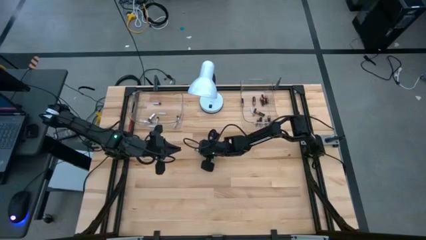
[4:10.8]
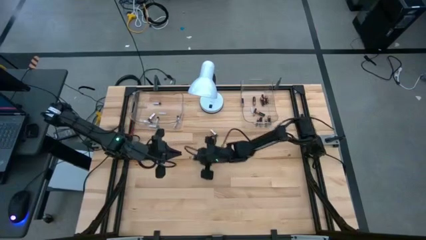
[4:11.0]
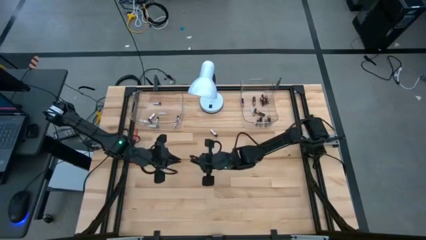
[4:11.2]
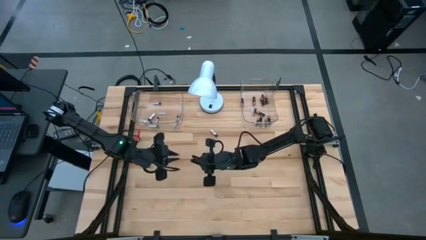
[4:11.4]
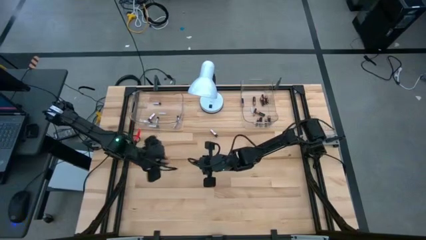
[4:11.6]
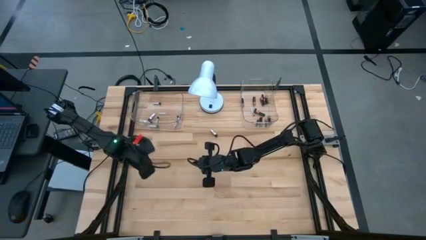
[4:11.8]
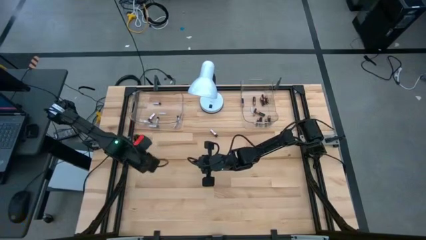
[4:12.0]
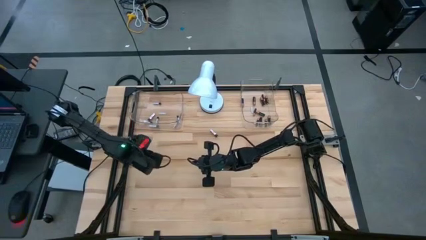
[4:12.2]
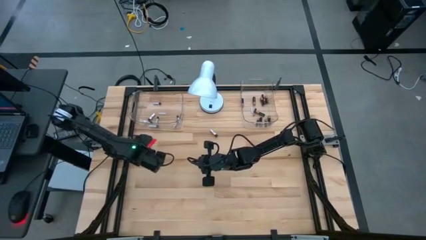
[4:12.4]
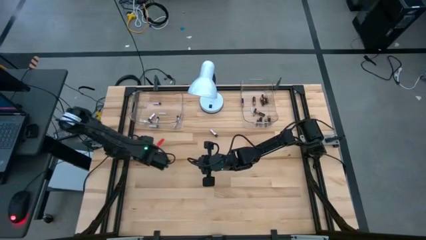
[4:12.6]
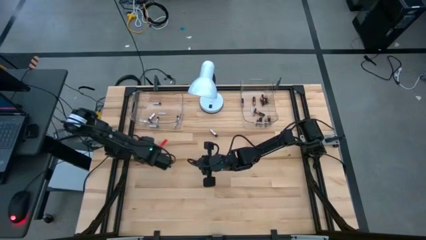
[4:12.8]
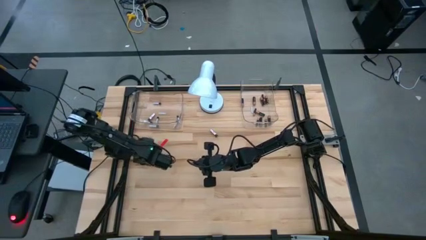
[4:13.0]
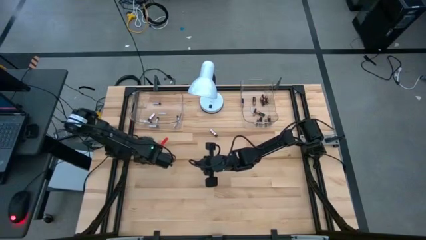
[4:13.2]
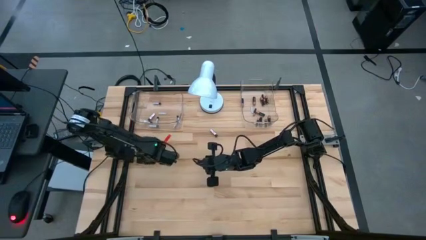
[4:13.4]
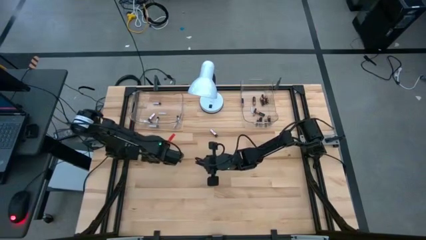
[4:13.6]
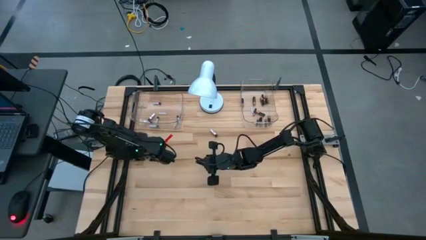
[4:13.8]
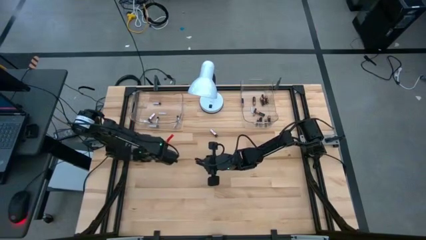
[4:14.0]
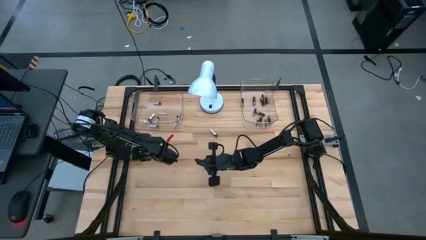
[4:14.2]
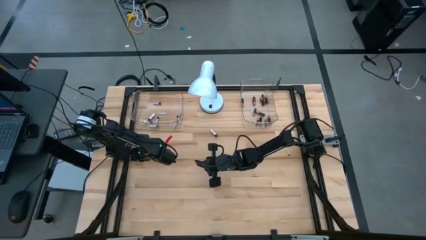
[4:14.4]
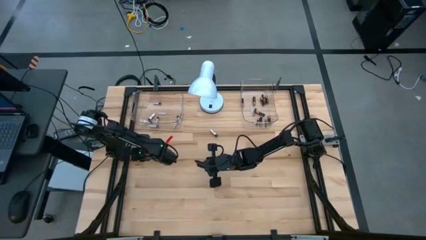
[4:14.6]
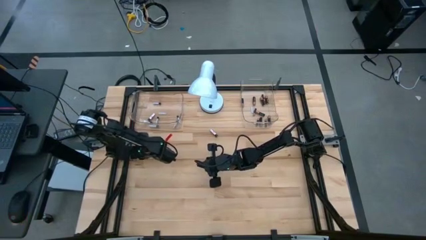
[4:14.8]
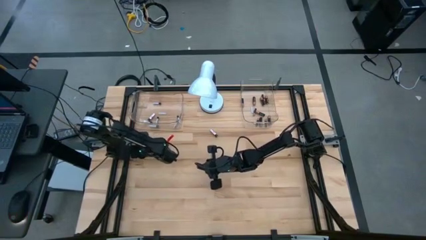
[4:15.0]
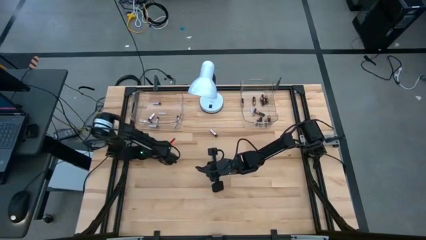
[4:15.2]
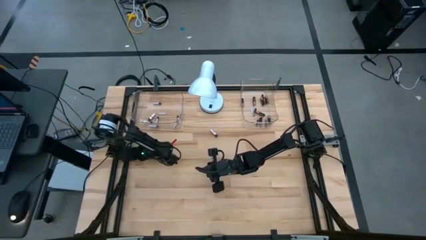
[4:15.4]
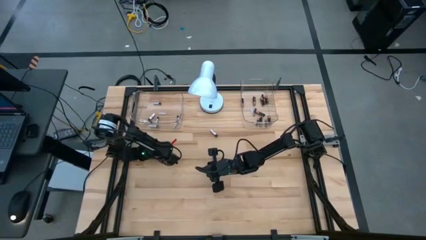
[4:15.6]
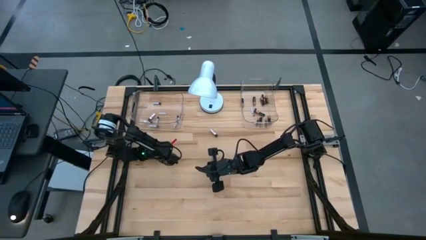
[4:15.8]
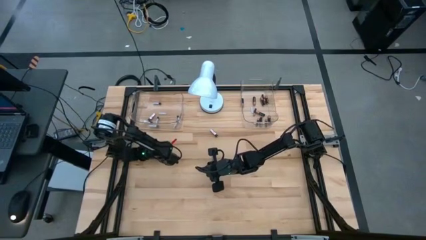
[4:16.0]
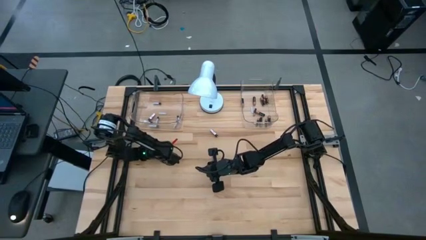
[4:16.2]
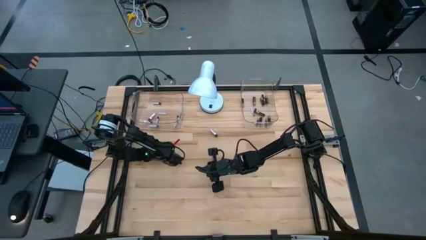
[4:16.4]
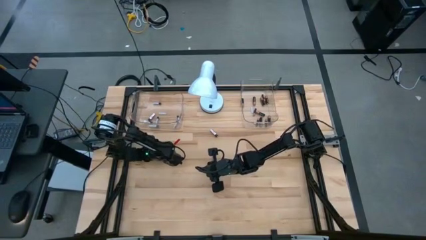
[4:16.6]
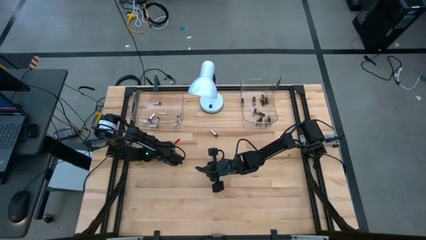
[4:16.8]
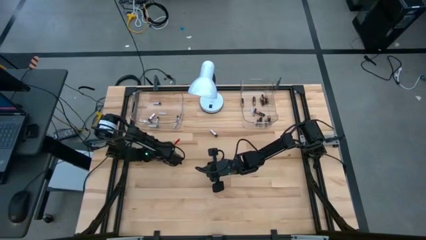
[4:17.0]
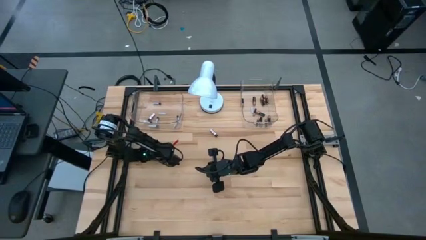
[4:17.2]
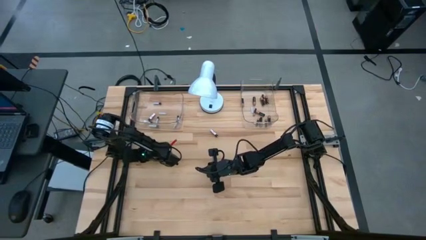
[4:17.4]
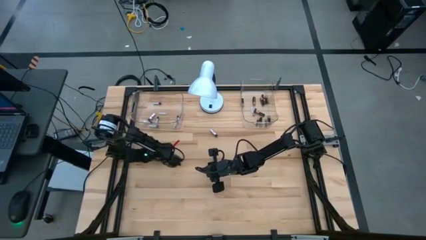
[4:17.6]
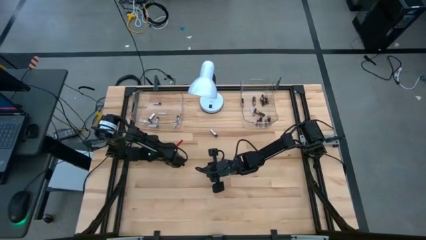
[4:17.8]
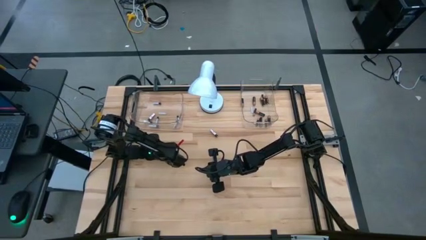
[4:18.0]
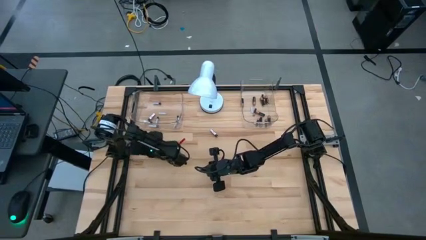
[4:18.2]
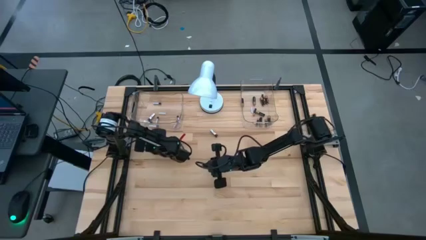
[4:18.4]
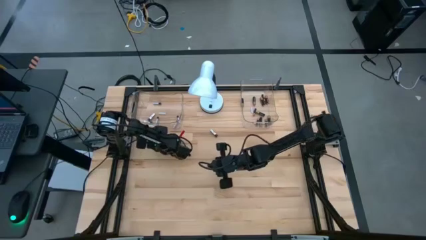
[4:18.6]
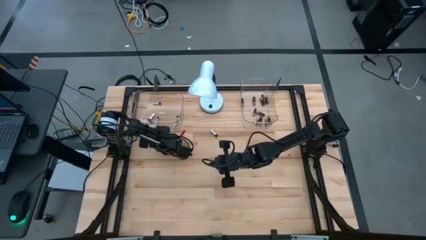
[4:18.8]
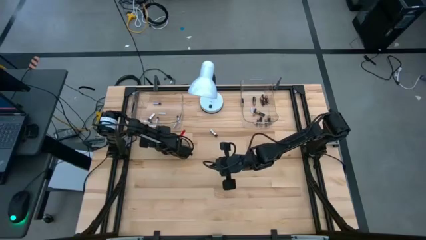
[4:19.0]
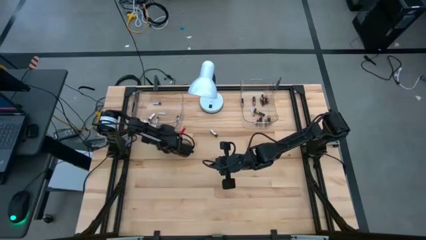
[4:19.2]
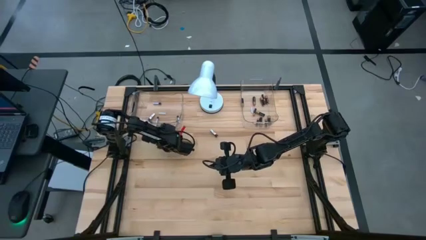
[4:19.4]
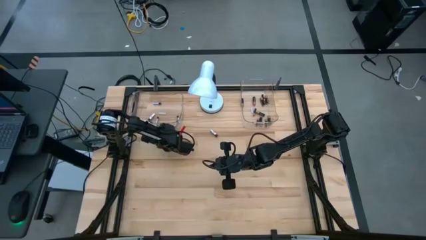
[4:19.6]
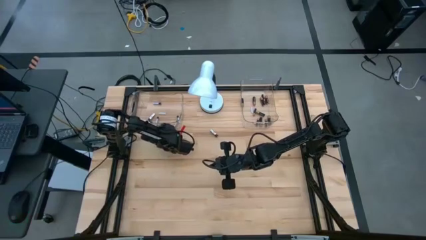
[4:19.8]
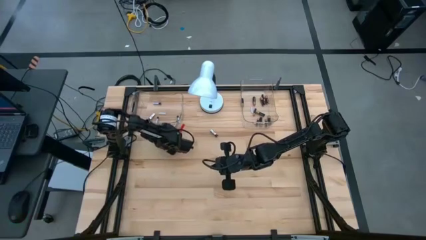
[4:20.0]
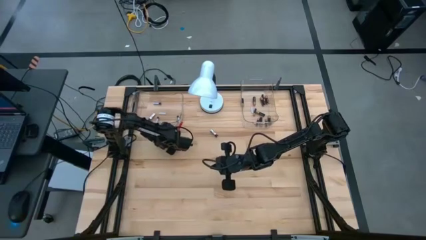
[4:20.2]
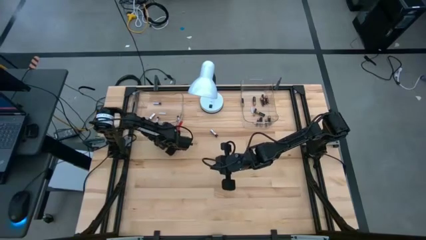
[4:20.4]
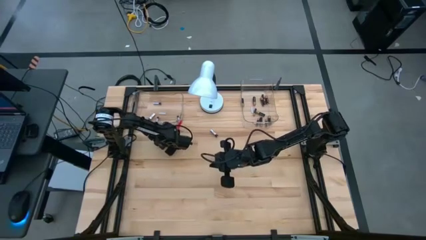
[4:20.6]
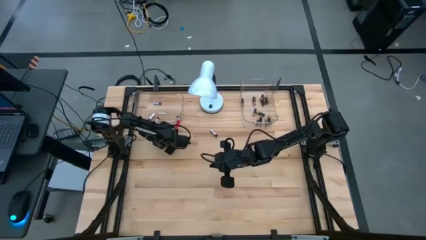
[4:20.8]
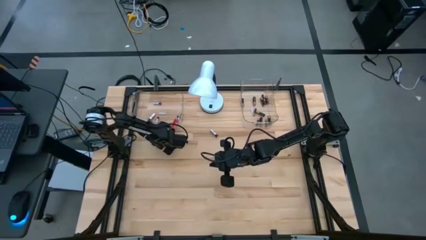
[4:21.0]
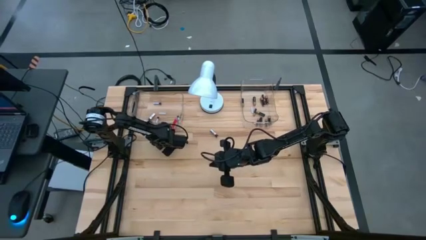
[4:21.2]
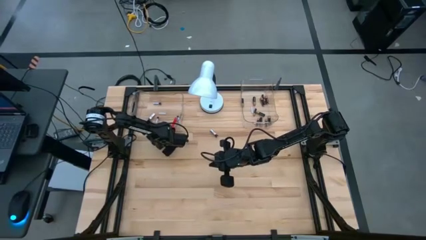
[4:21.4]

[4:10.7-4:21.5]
Task: Sort batteries
Put the silver battery in the transparent bin

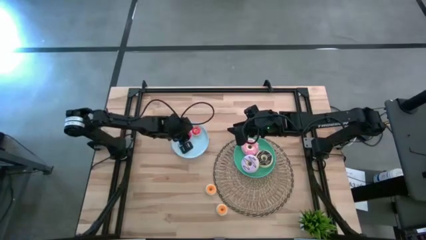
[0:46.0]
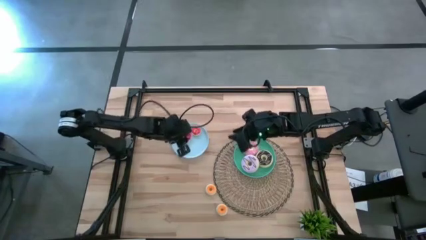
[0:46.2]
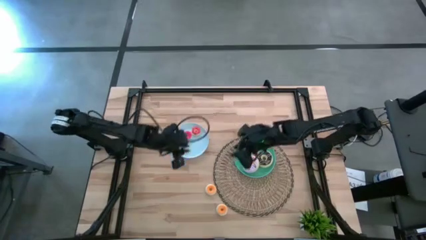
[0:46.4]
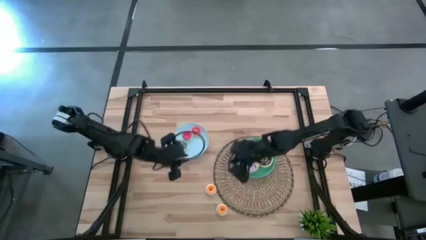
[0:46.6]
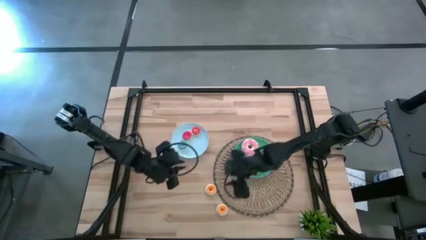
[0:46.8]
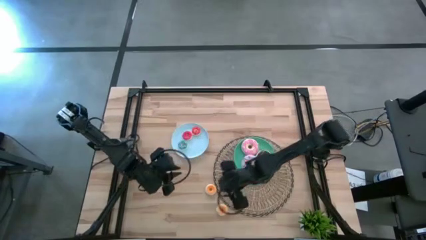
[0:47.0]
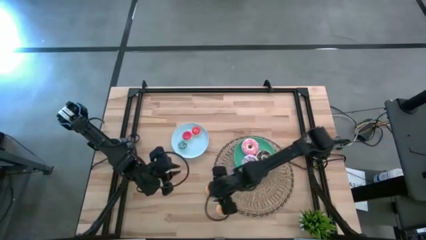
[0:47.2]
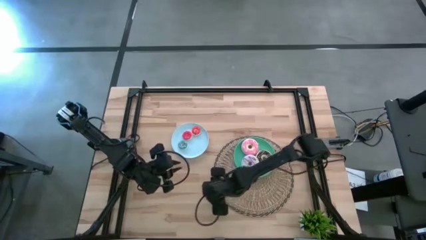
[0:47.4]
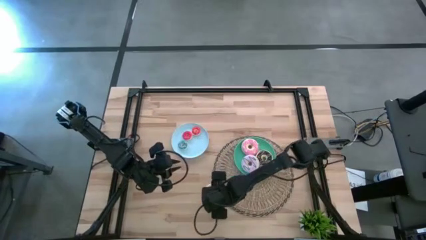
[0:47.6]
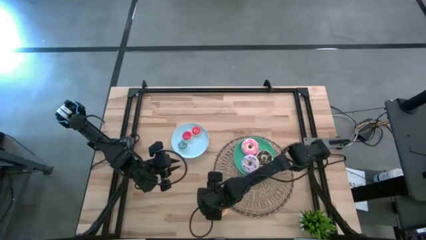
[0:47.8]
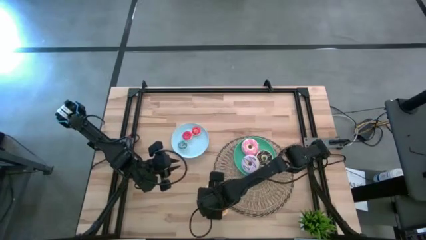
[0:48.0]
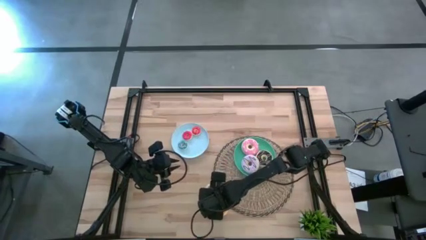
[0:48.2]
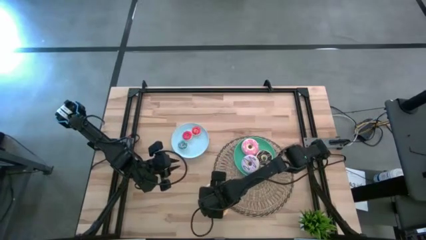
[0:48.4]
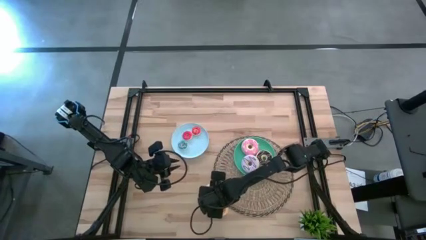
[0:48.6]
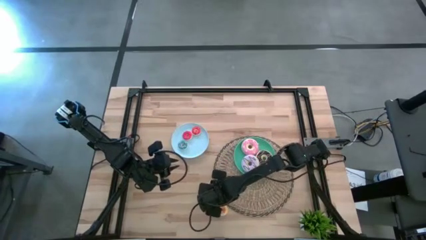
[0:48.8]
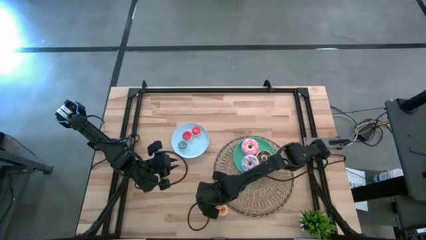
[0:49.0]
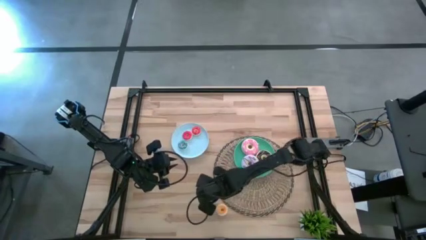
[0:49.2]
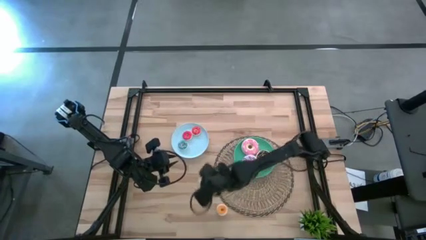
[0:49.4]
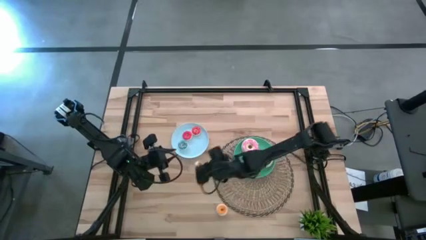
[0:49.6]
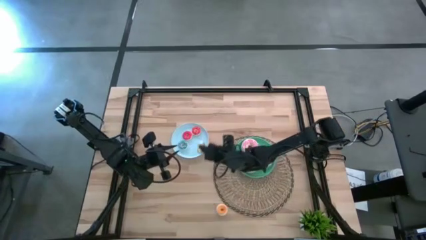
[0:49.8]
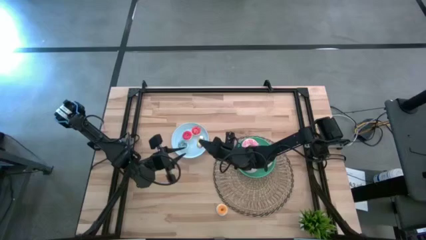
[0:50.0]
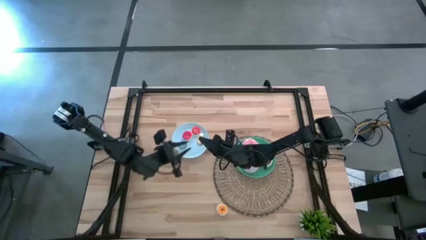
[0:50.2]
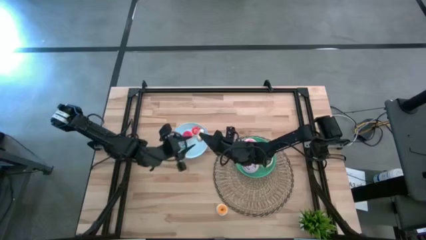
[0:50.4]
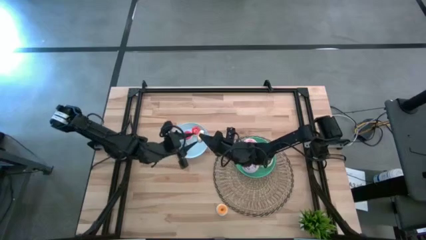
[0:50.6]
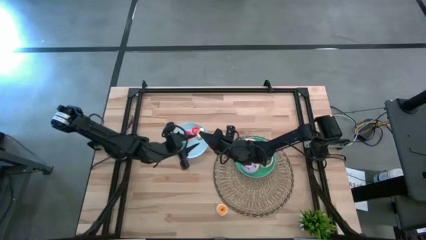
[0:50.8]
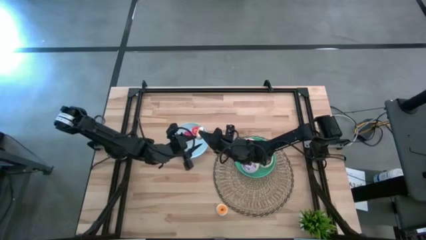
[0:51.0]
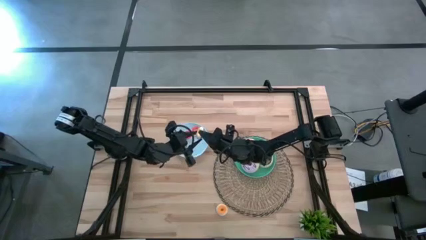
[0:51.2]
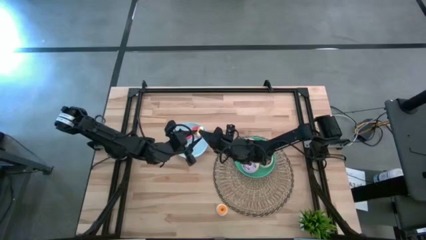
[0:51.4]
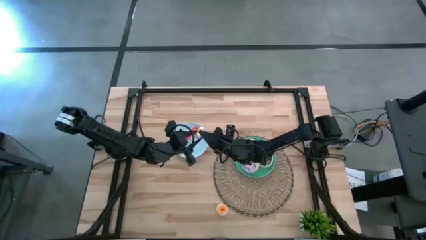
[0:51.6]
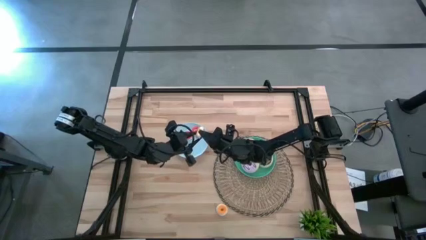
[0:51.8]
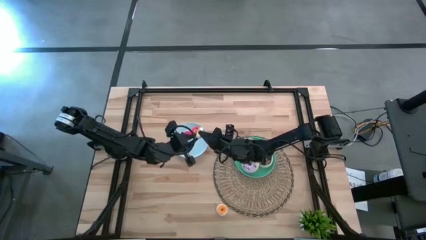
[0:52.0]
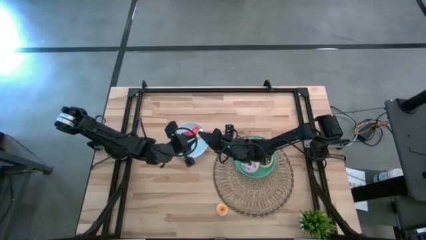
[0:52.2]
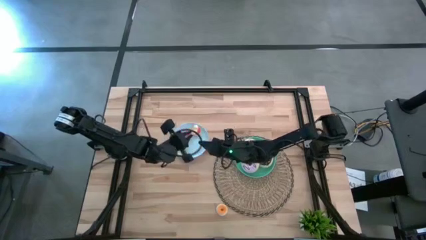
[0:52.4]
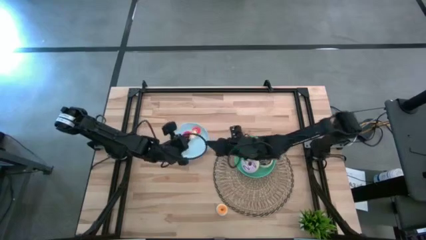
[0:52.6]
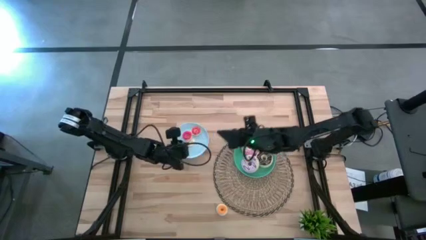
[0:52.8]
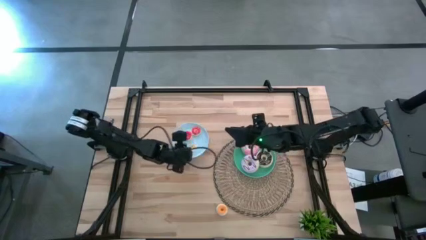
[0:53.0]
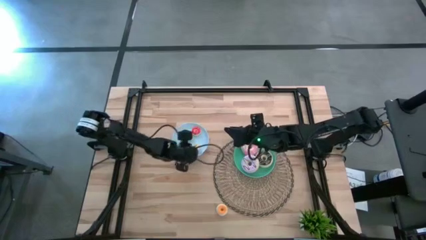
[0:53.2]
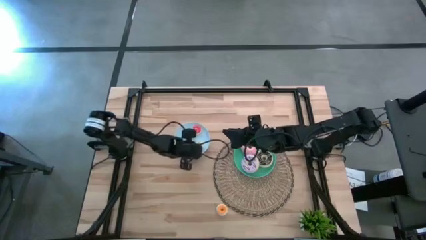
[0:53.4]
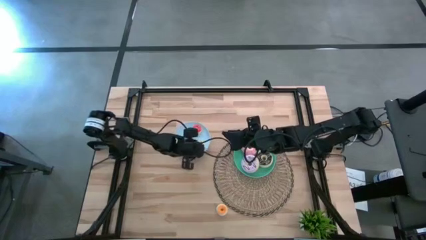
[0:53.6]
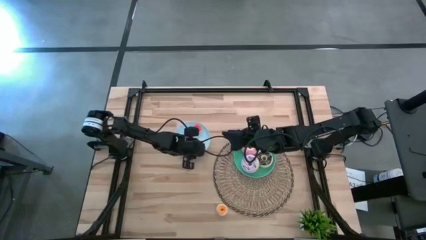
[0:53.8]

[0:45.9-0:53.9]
Task: Pick & Place donuts
Put the small yellow donut onto the blue plate
